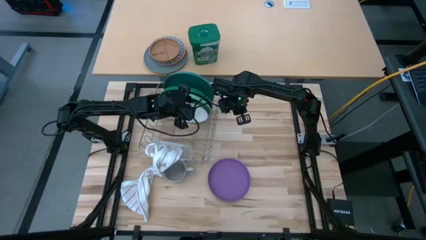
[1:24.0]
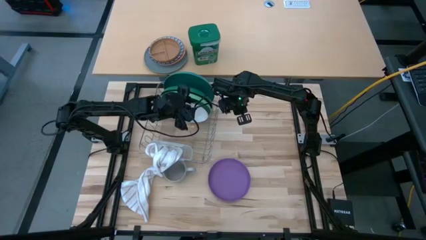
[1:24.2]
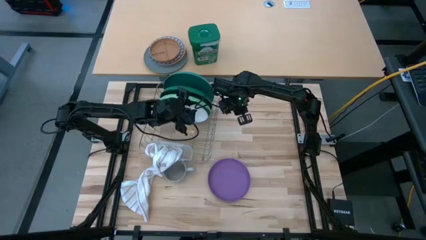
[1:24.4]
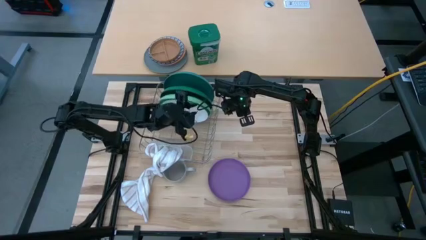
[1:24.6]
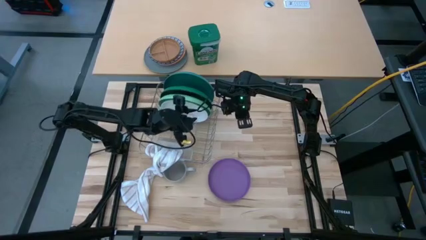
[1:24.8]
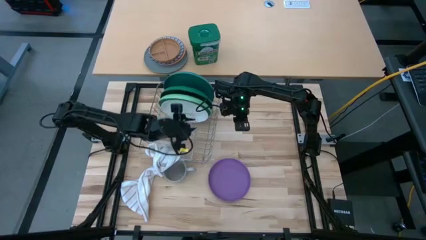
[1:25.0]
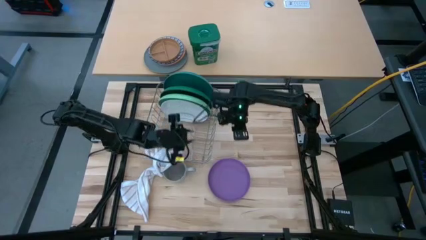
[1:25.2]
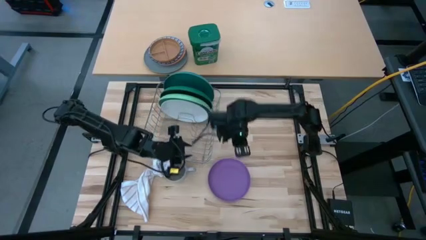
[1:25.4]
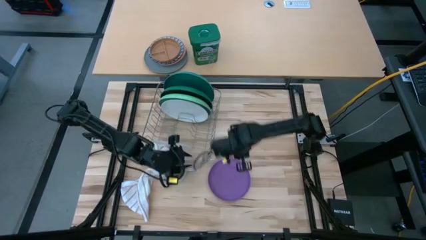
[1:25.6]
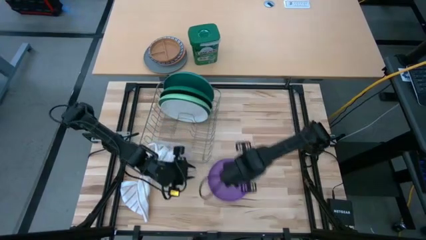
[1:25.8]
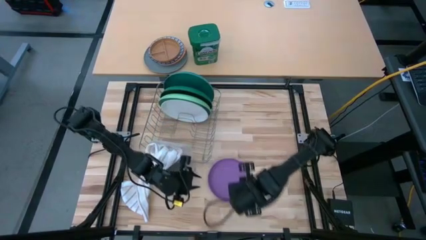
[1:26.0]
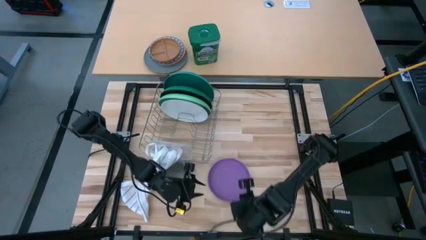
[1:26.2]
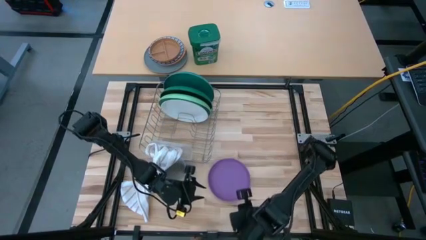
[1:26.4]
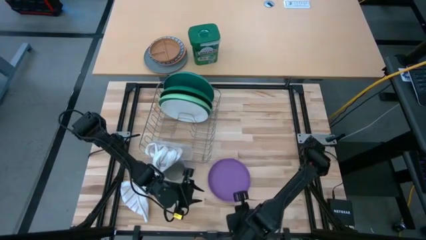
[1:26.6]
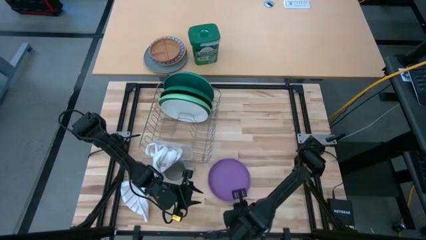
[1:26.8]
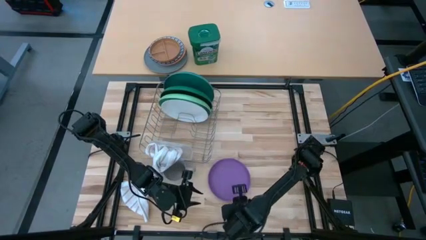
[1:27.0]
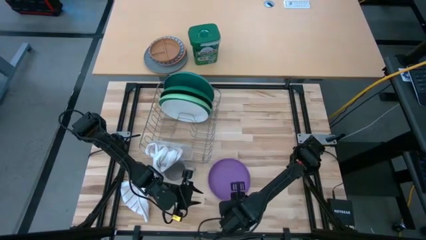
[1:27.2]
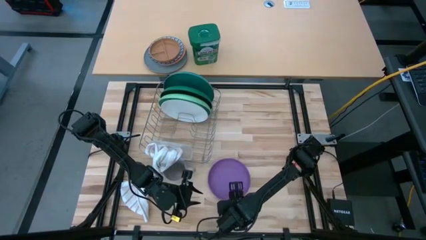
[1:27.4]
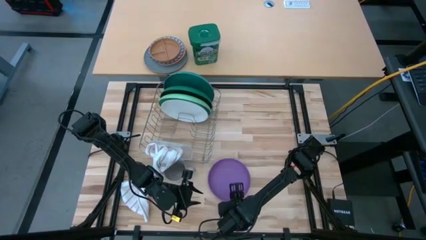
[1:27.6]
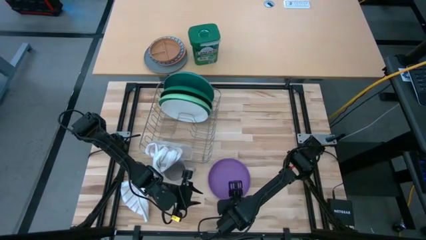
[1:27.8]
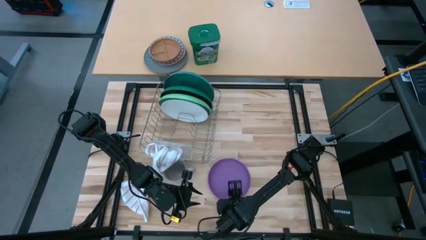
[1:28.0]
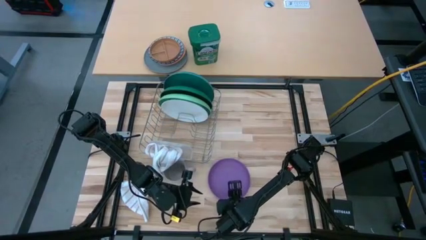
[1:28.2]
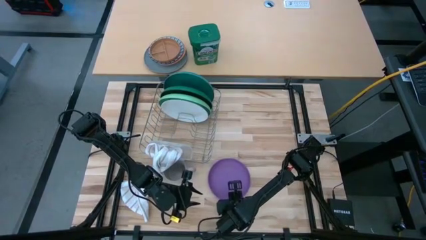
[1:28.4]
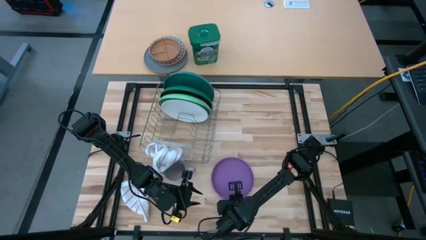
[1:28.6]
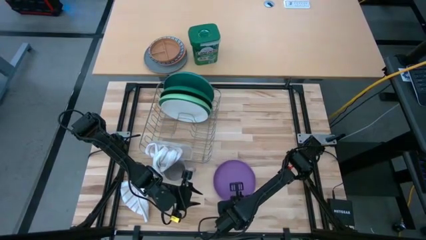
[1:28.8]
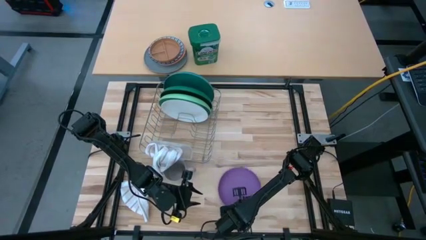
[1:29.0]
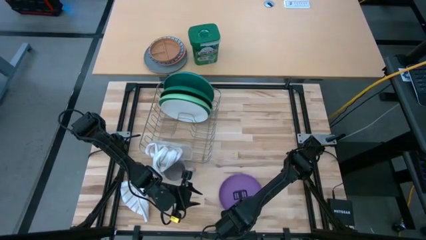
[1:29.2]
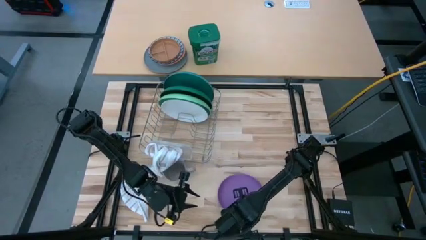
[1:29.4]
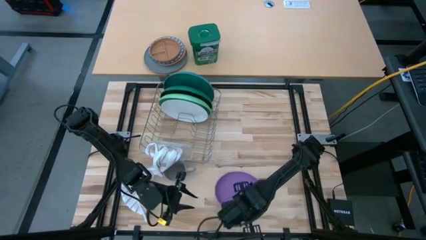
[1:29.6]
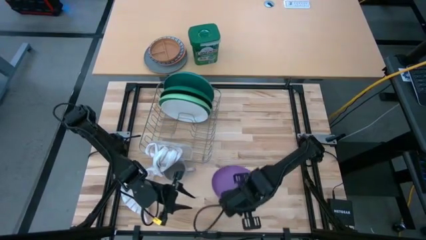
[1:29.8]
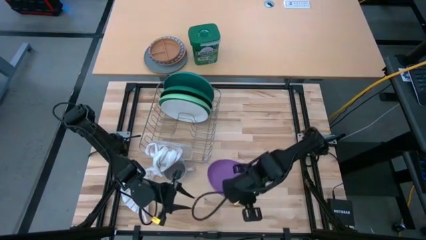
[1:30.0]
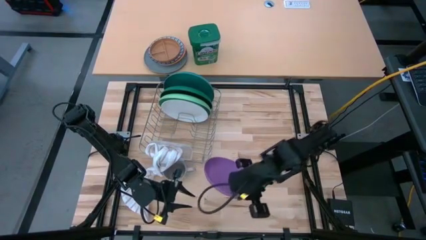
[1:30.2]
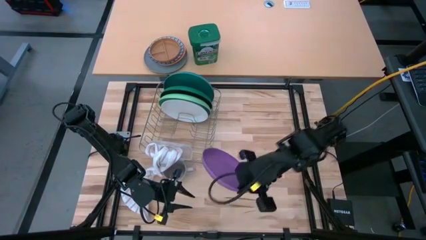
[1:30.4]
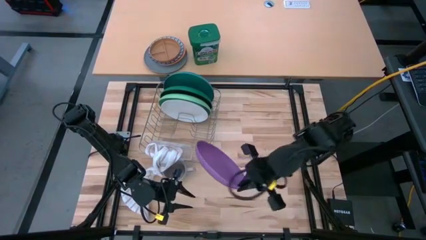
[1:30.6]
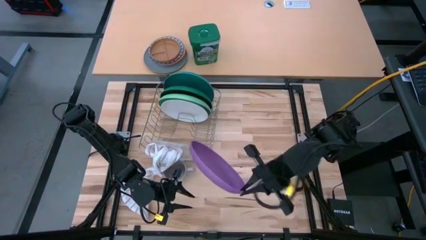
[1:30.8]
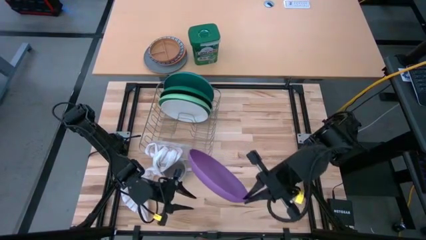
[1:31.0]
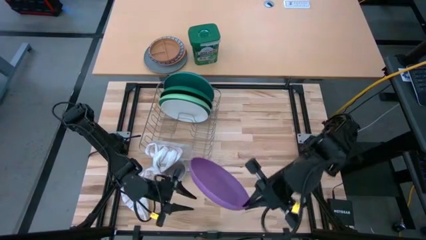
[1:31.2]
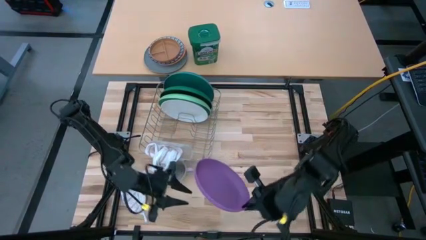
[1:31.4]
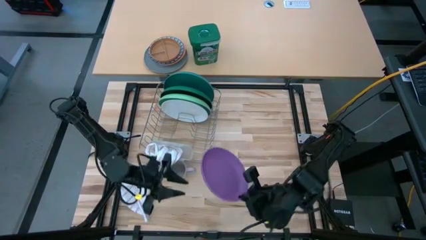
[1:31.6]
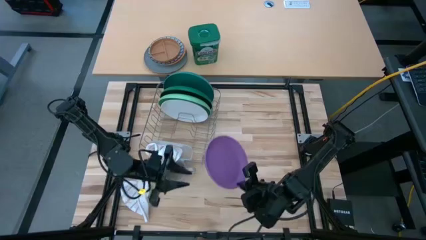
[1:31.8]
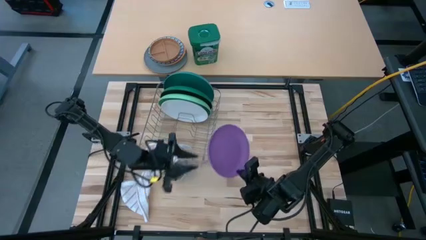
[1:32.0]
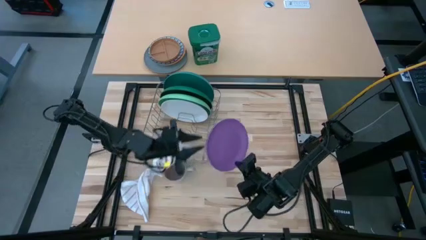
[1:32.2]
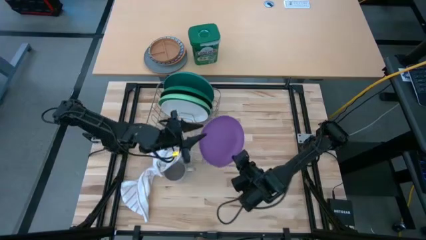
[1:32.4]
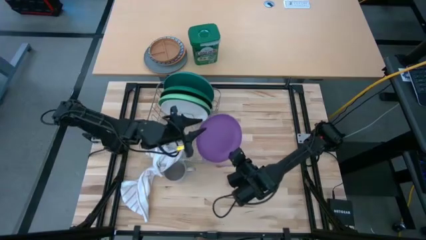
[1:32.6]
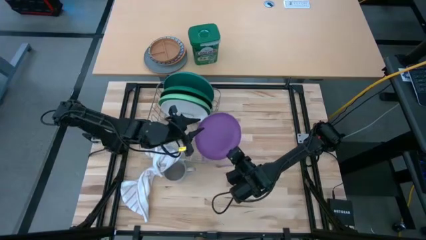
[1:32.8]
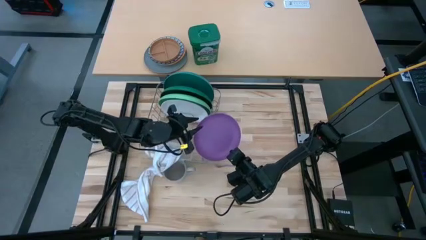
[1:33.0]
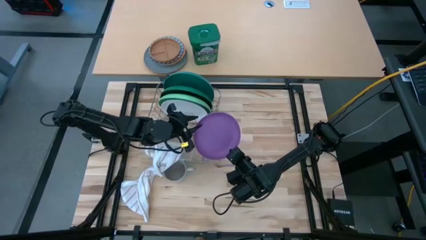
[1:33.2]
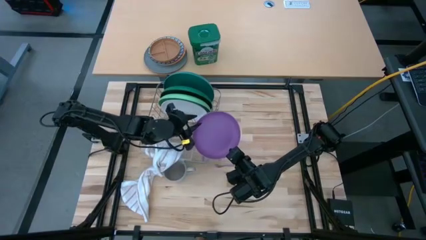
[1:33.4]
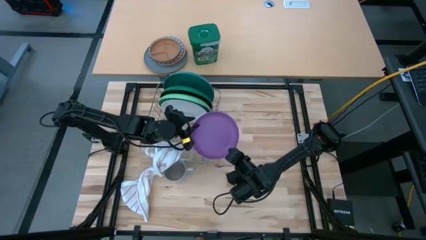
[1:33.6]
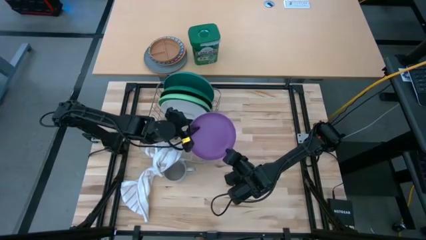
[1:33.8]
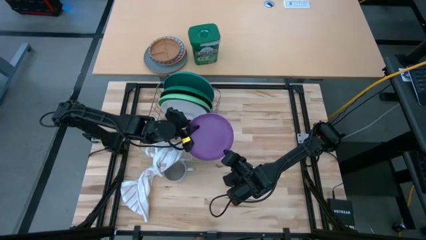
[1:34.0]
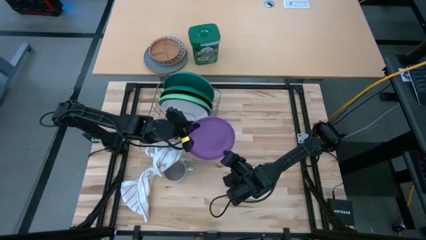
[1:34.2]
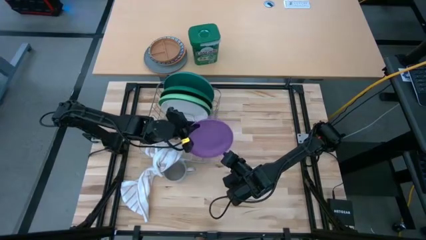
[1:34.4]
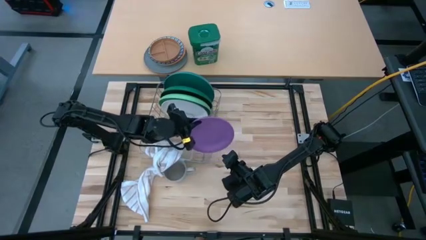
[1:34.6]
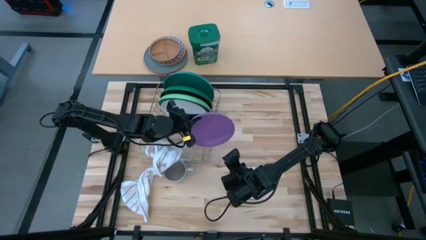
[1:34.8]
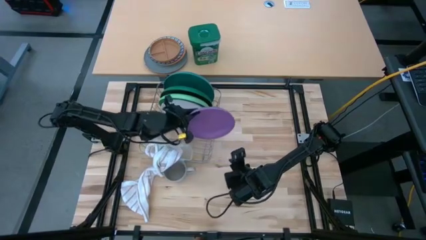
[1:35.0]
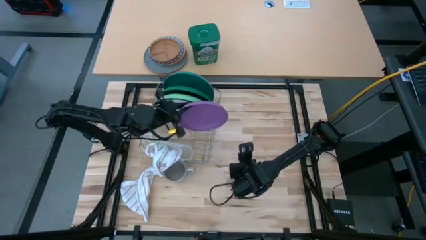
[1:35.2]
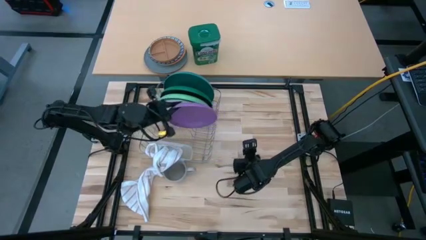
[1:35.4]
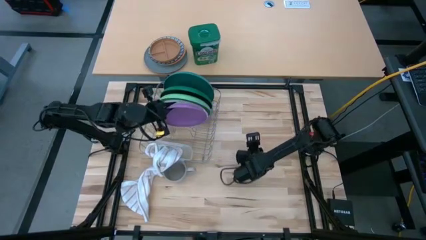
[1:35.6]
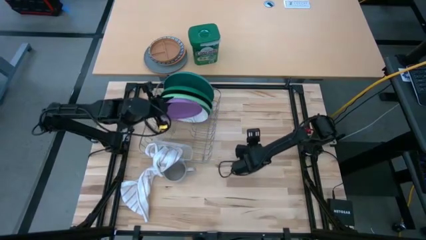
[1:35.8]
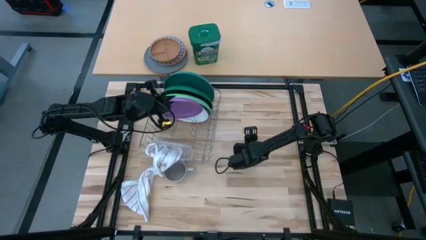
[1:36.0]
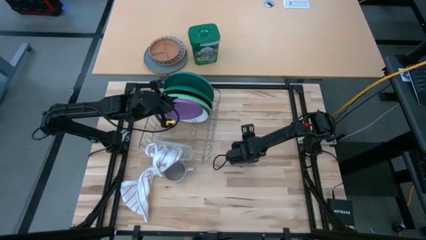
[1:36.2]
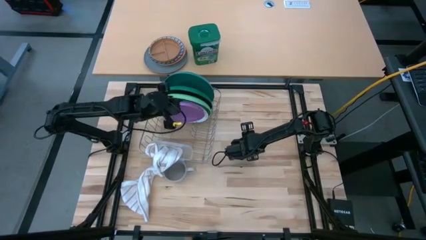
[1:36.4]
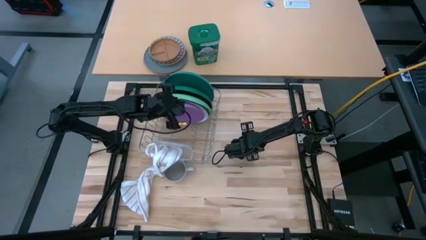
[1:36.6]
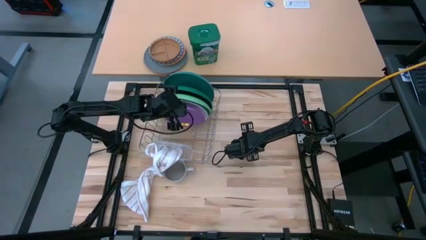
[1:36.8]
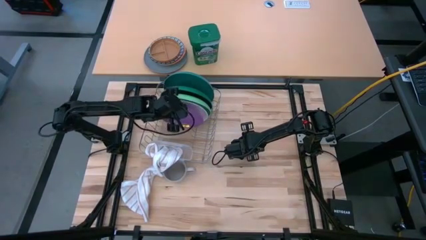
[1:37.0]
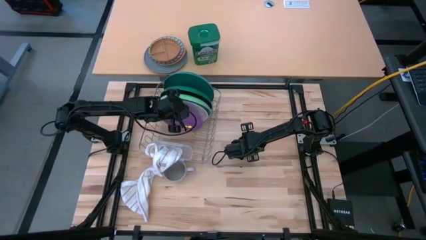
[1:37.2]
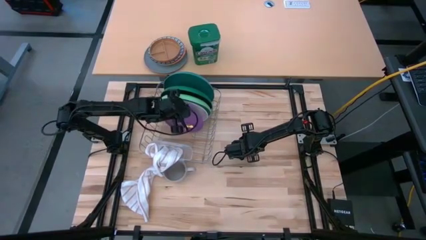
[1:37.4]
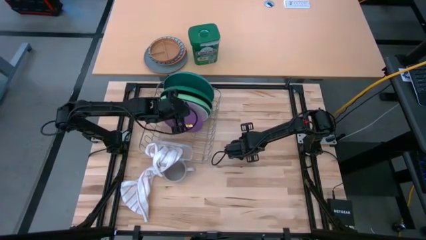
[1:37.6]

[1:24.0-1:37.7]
Task: Sort dishes
Put the purple plate into the gray dish rack

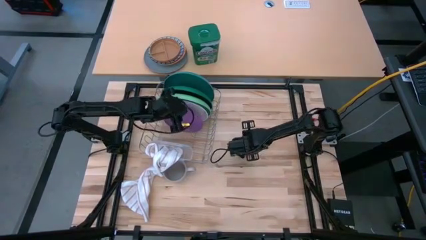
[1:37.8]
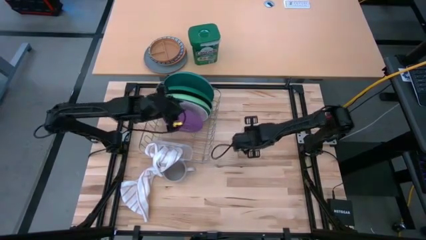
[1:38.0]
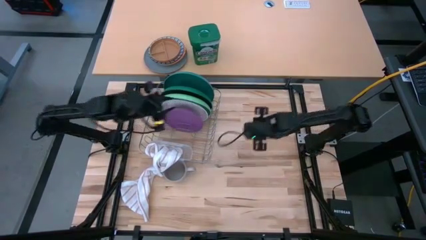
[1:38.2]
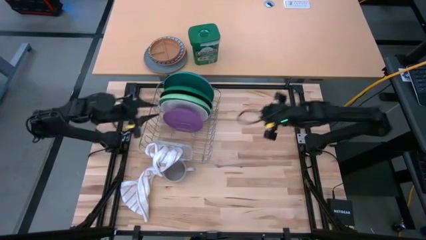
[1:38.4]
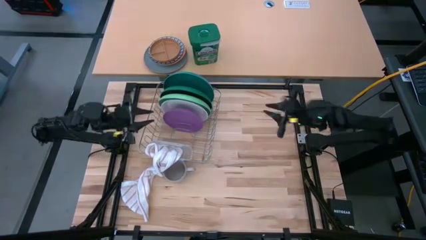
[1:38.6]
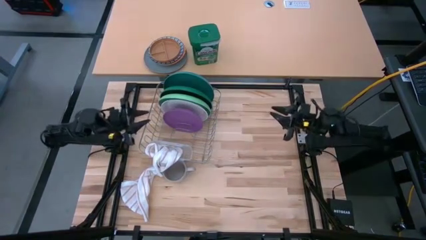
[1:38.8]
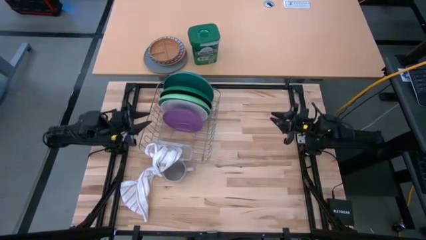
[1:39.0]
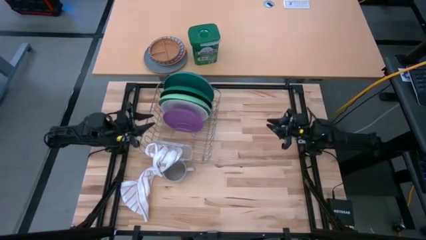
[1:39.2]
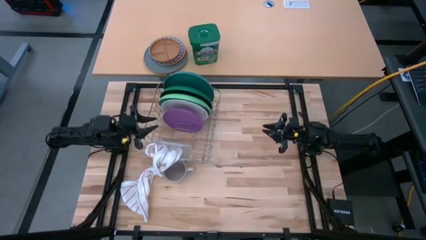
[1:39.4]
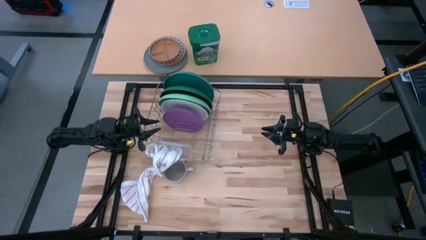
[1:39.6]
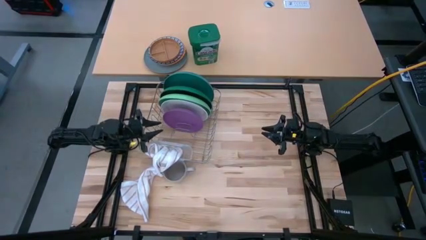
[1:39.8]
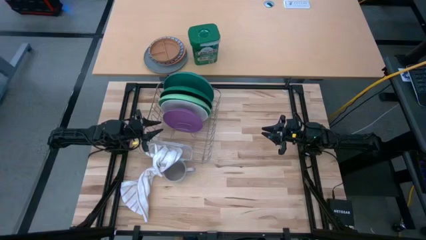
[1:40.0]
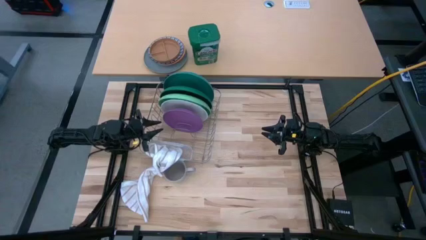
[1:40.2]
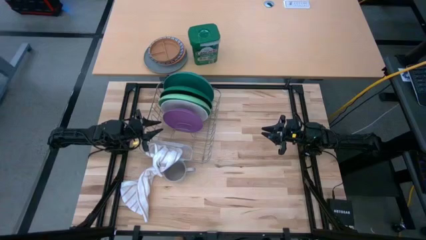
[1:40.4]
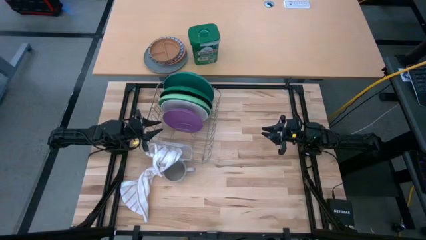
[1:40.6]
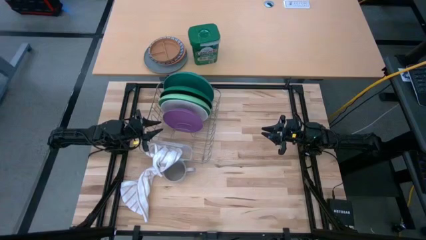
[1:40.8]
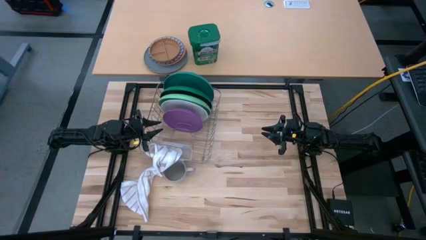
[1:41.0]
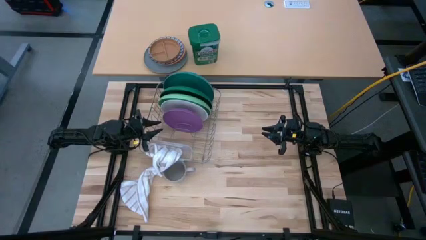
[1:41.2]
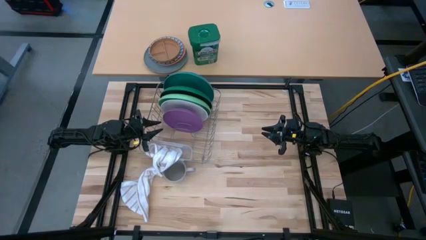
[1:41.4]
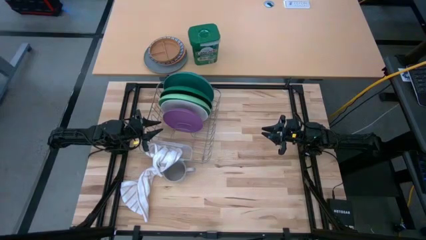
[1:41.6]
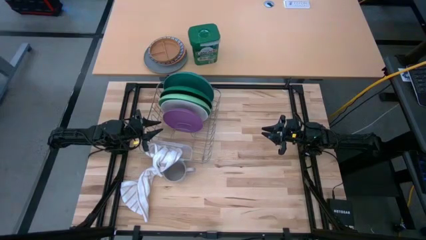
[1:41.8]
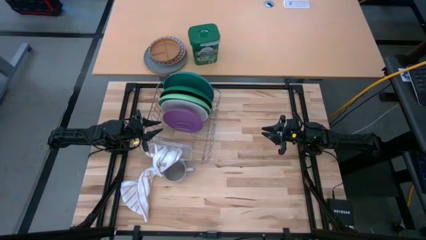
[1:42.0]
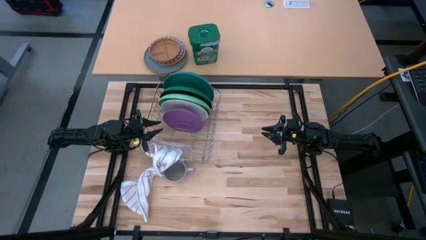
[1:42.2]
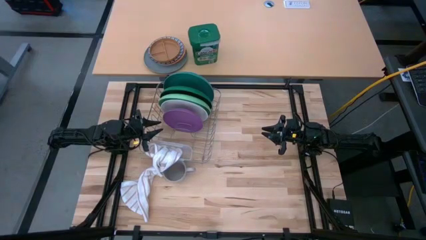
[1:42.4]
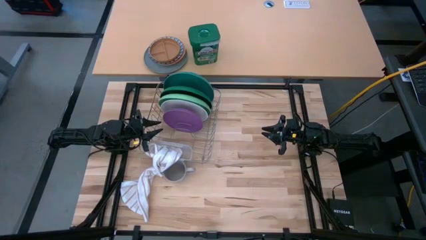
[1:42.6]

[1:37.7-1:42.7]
Return to Home Position
